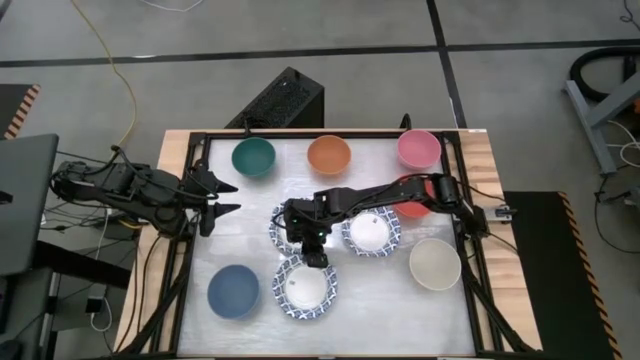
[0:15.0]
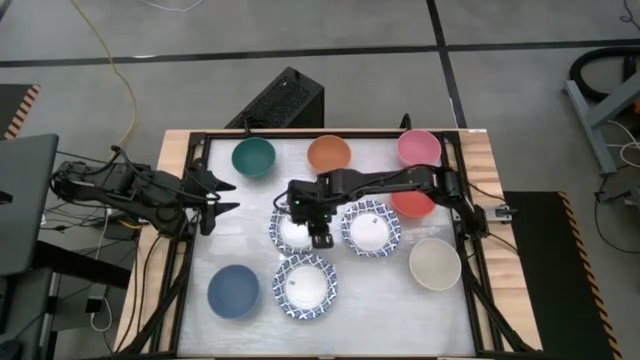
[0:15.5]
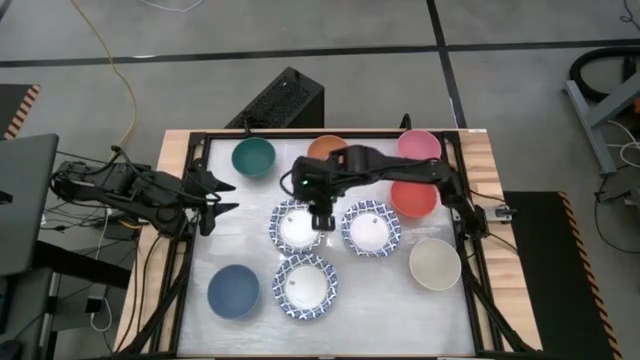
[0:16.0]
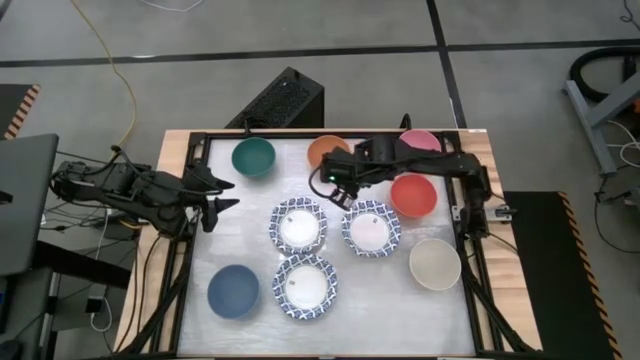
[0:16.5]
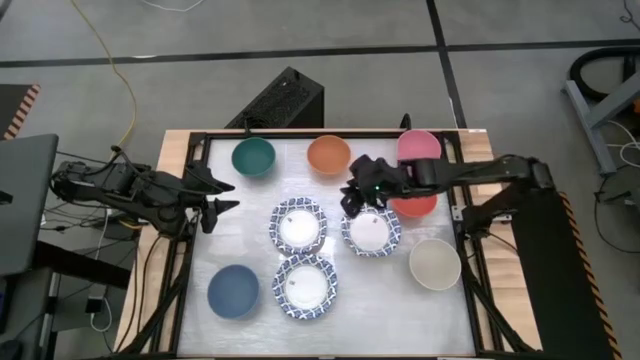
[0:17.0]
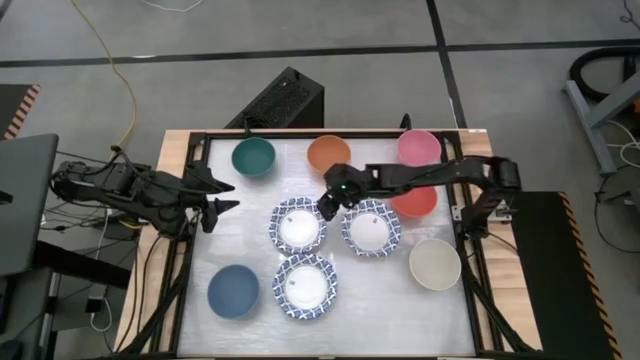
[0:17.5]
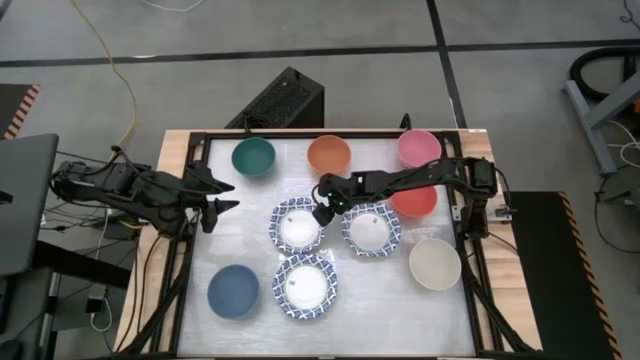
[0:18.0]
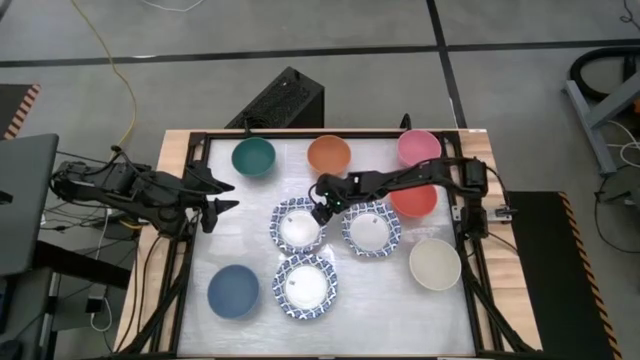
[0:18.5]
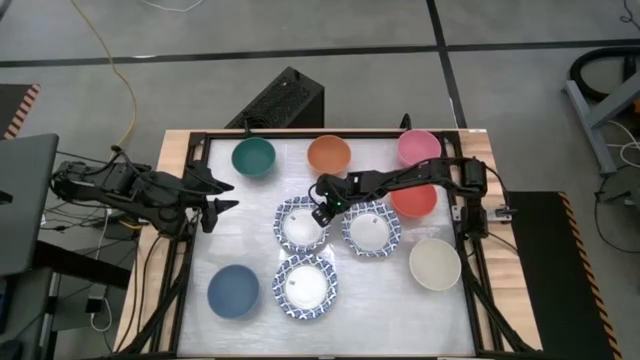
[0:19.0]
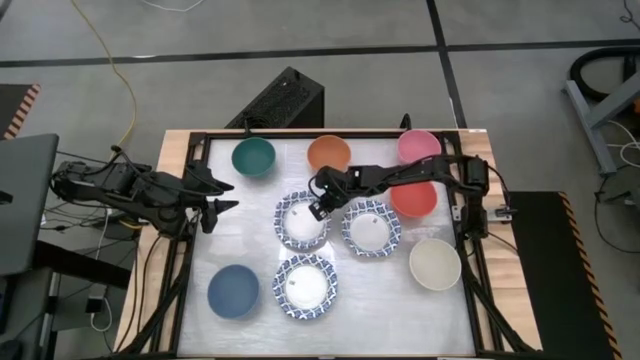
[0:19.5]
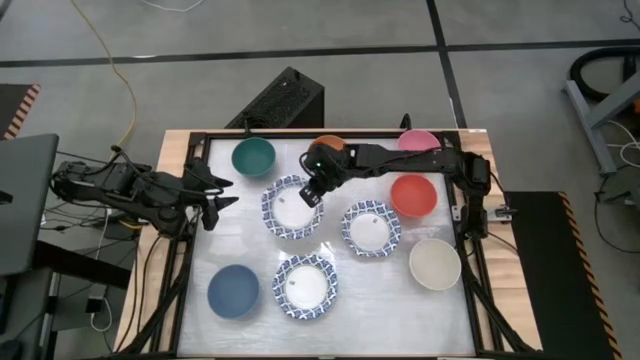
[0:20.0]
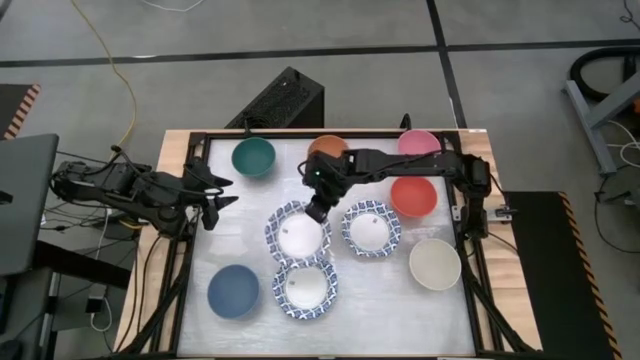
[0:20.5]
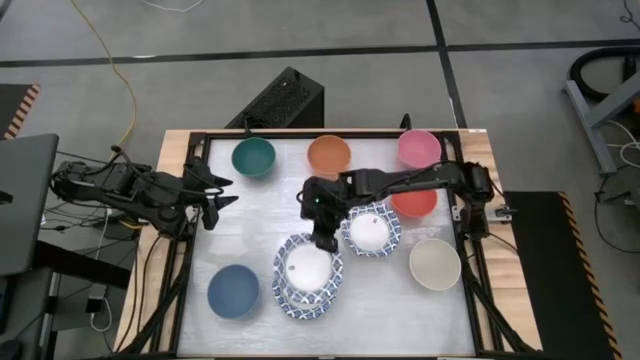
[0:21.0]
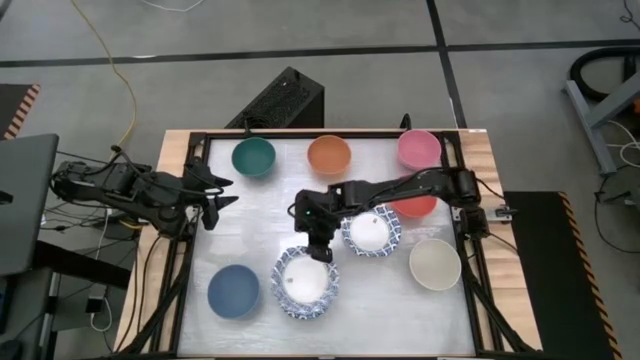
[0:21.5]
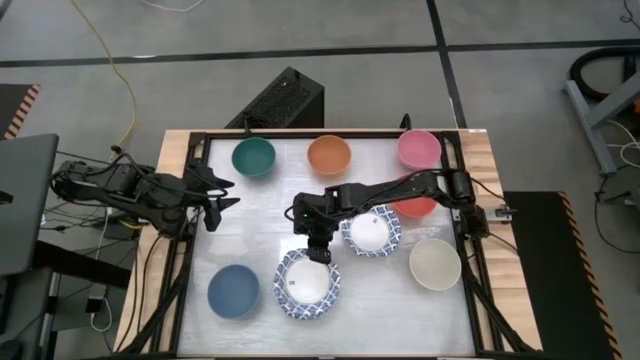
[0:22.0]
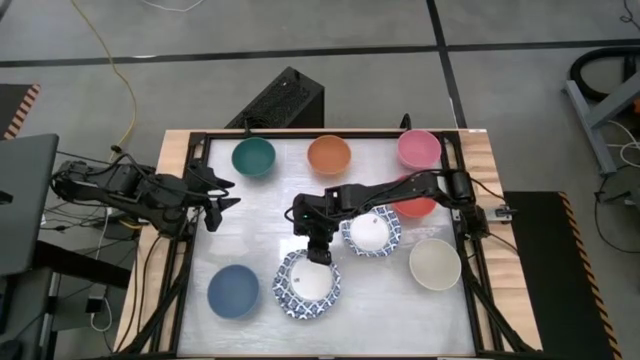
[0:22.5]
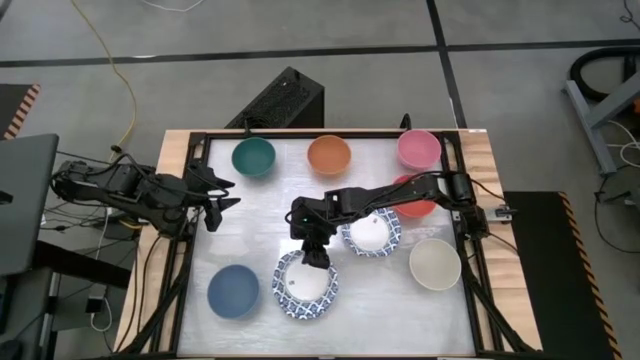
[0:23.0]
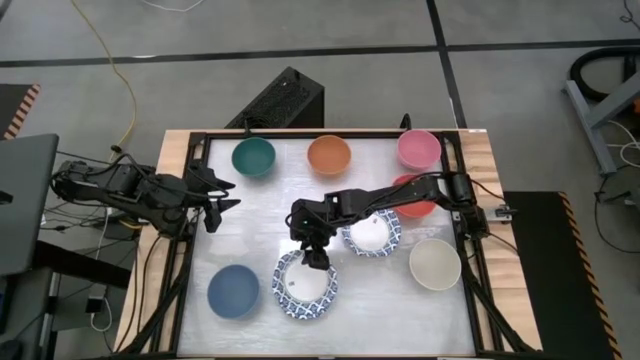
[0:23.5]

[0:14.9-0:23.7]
Stack the blue patterned bowl on top of the blue patterned bowls

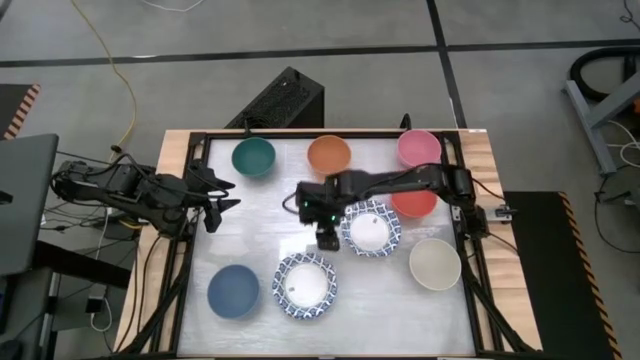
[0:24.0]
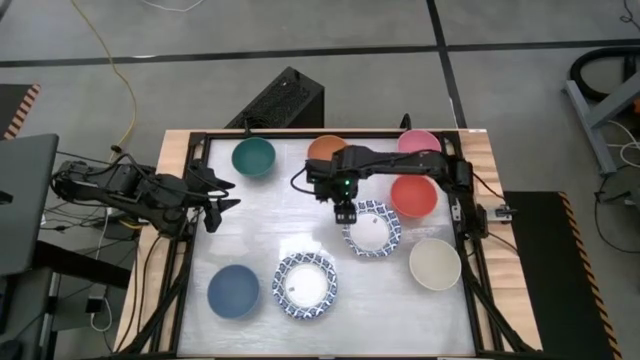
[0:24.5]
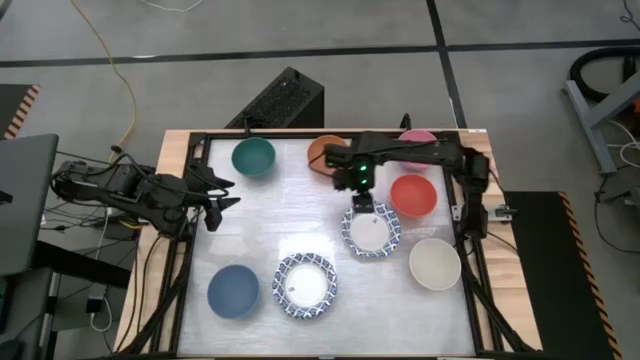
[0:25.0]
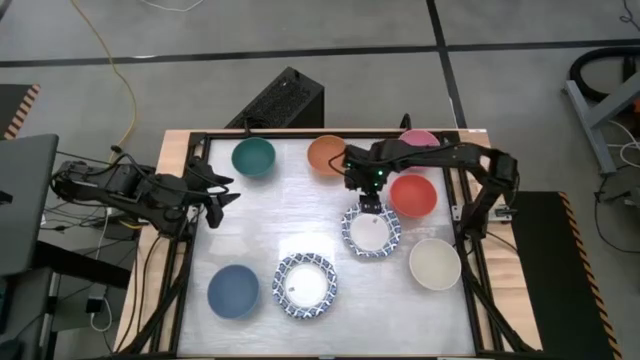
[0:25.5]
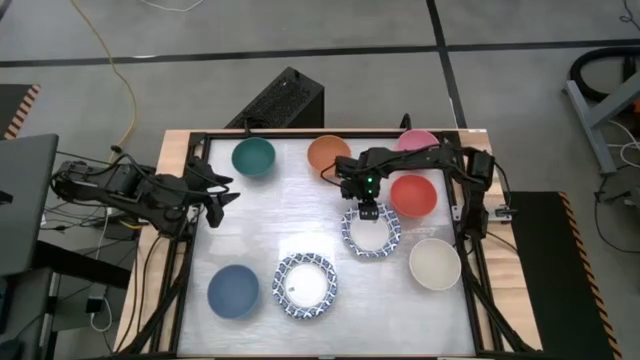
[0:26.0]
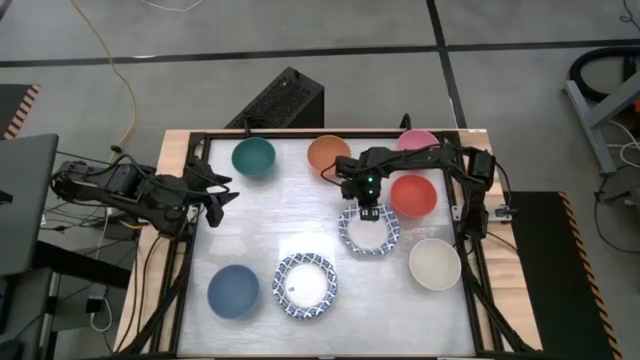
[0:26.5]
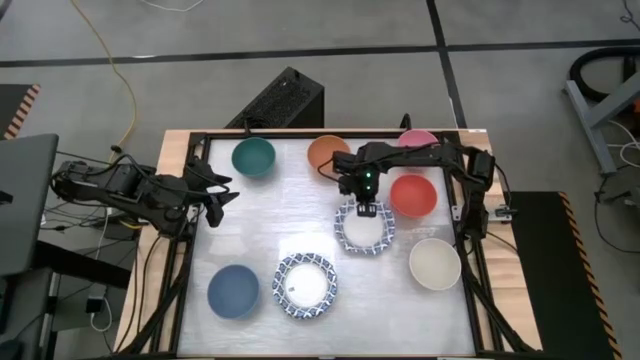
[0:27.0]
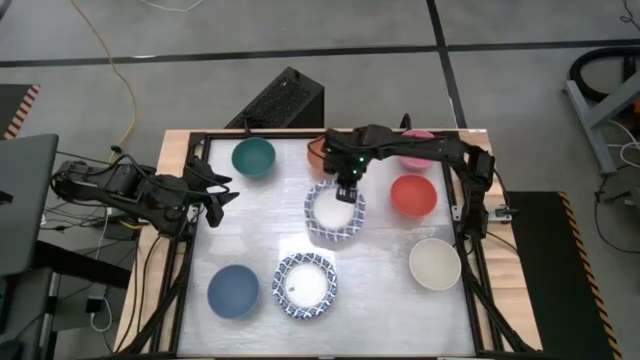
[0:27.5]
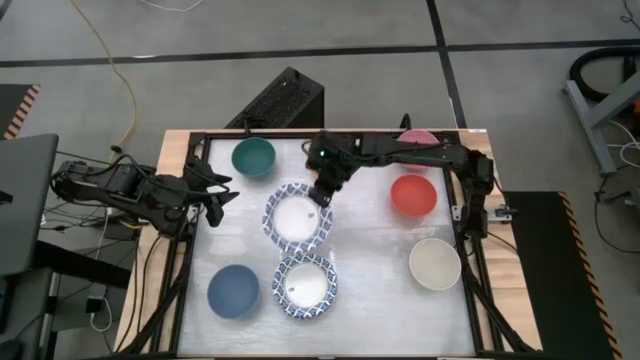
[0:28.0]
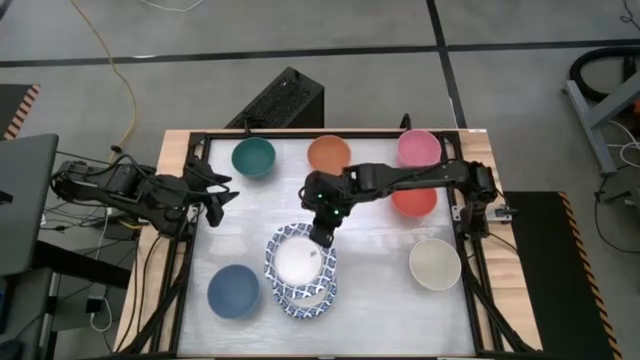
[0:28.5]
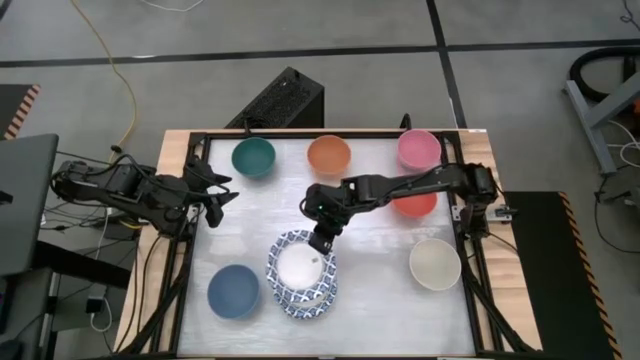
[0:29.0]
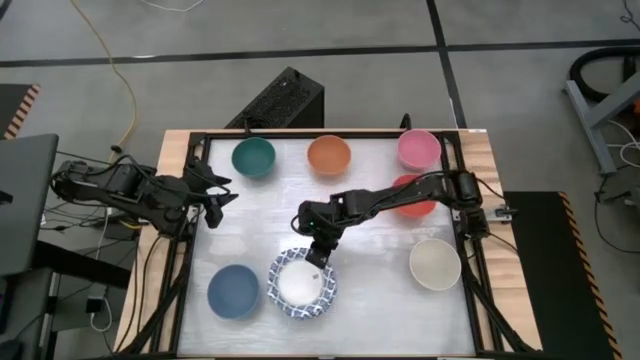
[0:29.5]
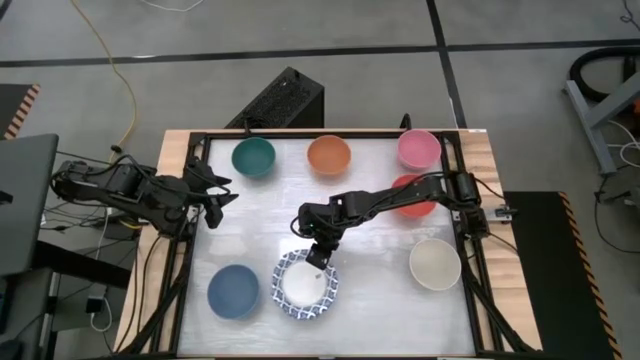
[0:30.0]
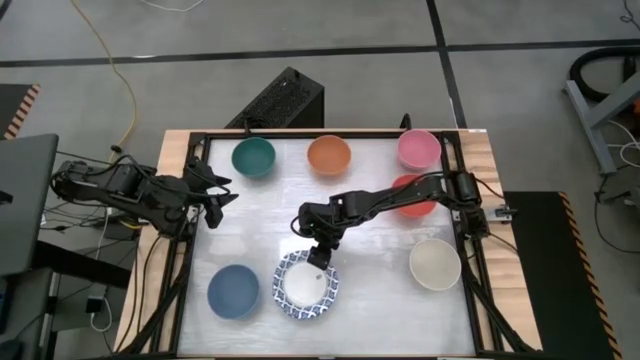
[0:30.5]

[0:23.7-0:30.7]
Stack the blue patterned bowl on top of the blue patterned bowls
